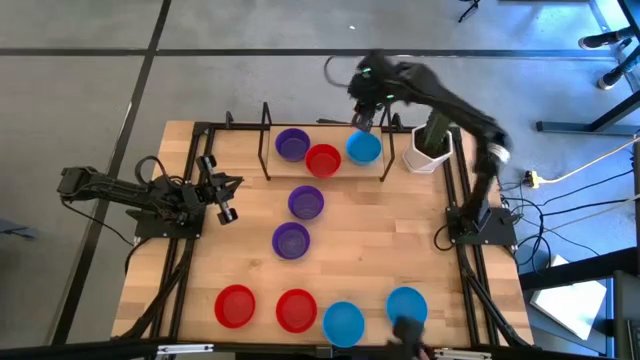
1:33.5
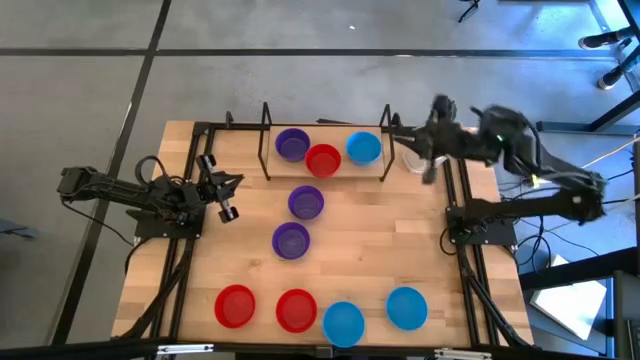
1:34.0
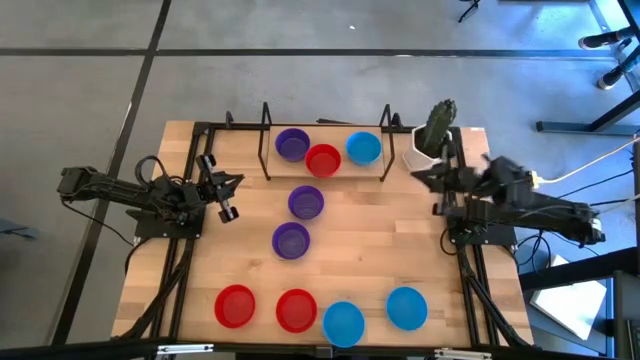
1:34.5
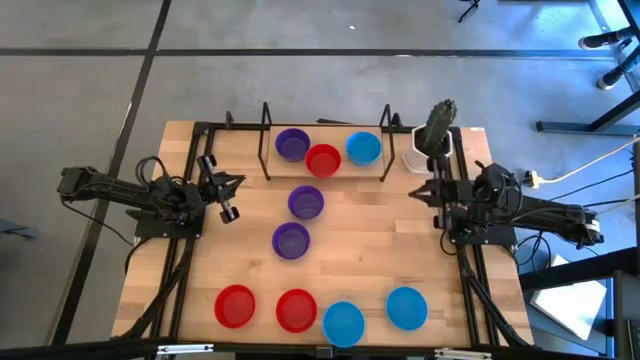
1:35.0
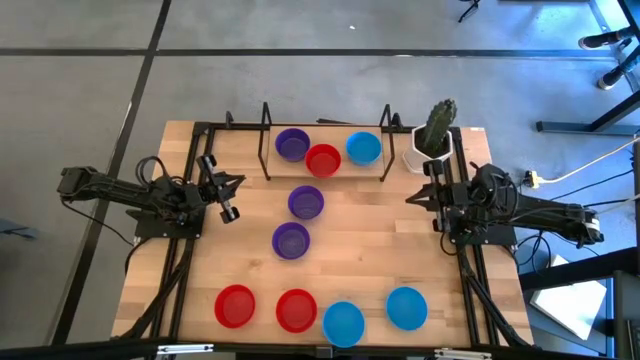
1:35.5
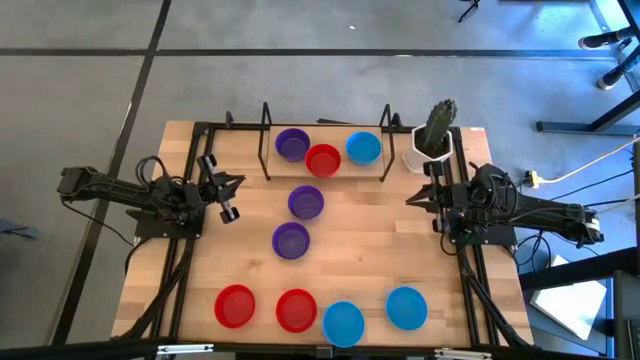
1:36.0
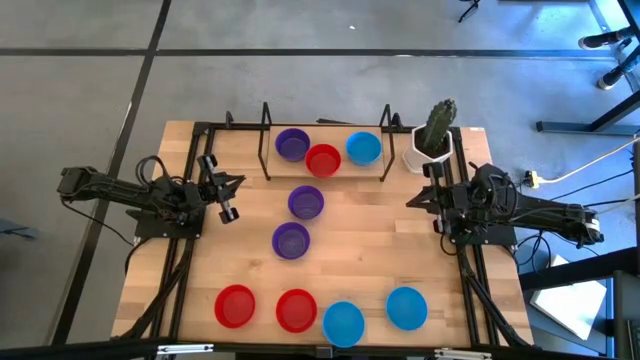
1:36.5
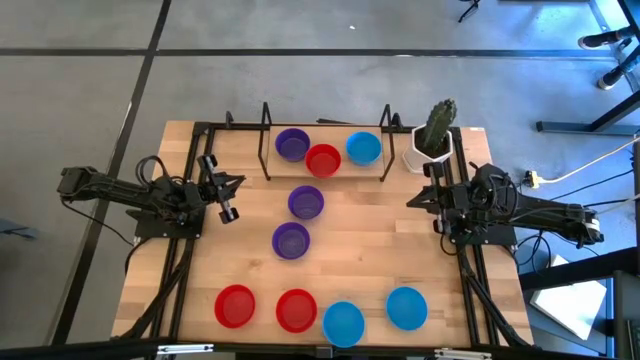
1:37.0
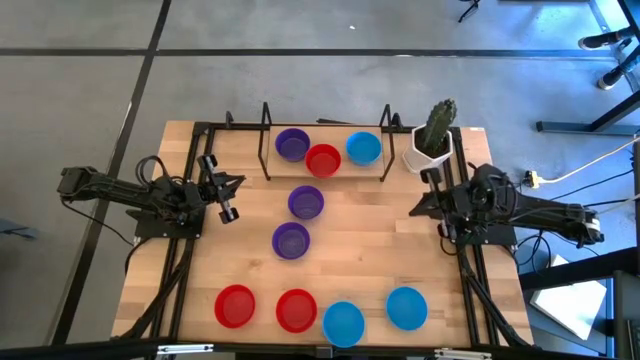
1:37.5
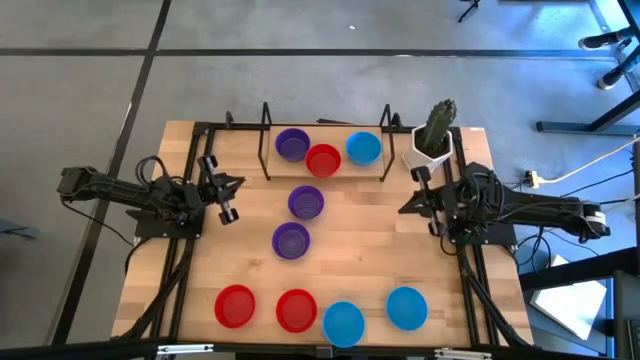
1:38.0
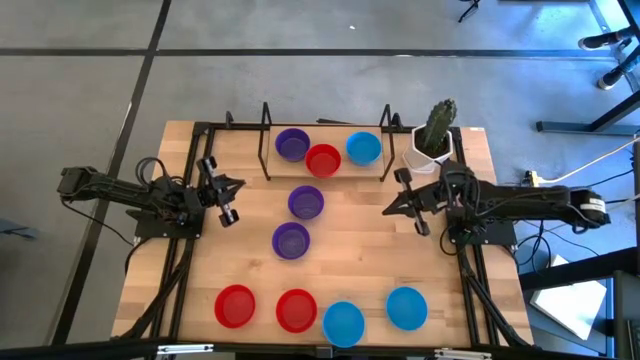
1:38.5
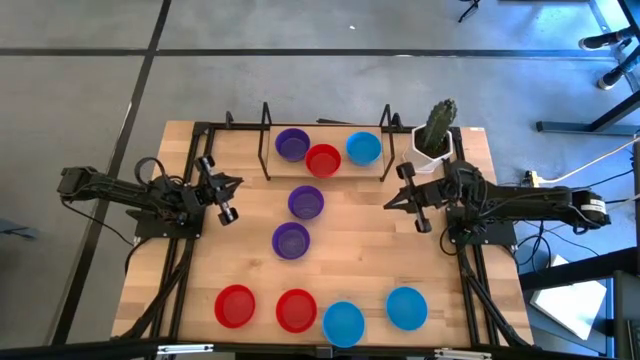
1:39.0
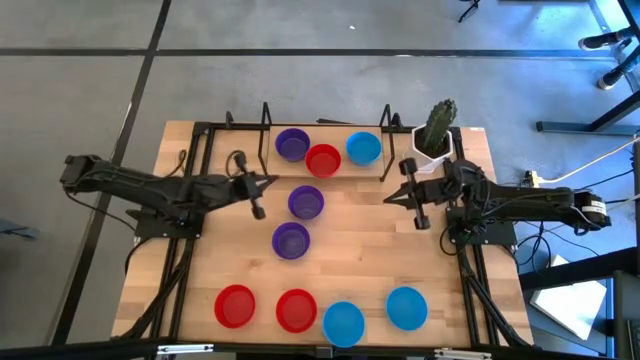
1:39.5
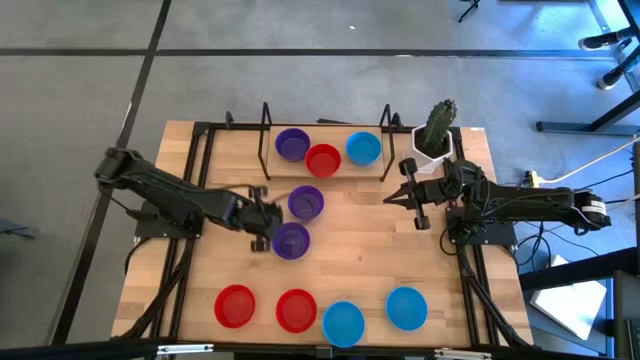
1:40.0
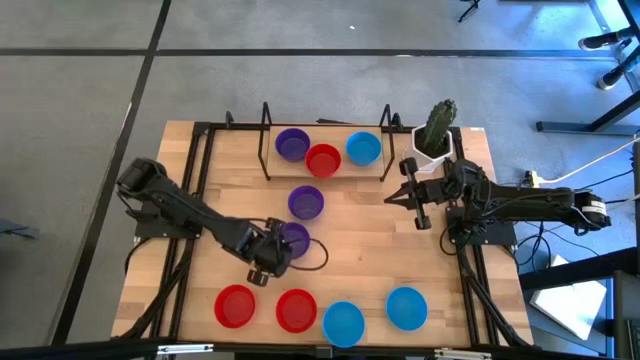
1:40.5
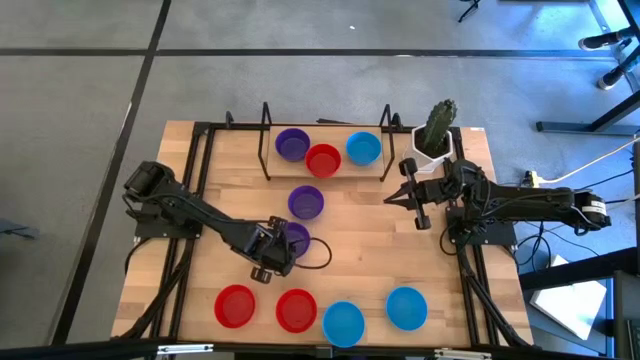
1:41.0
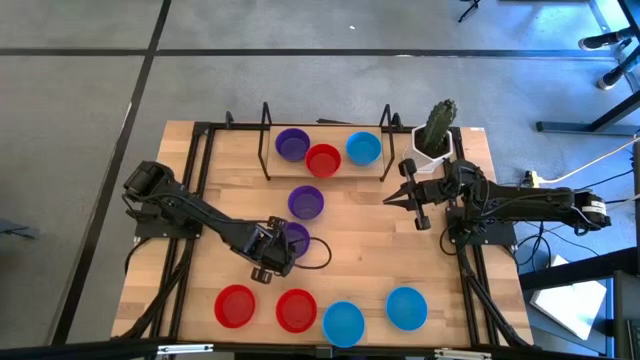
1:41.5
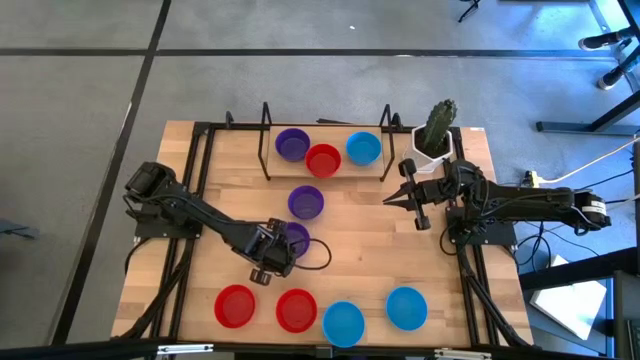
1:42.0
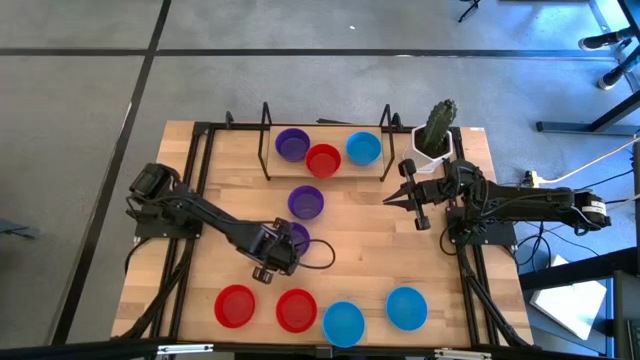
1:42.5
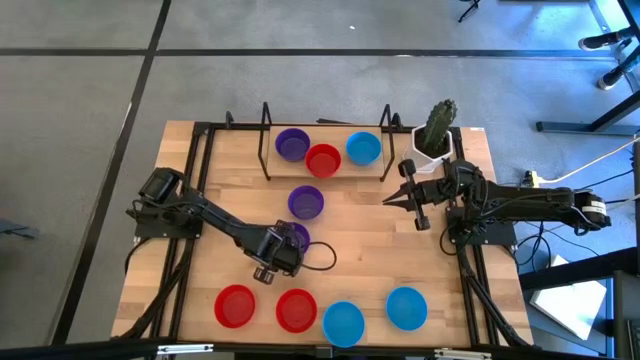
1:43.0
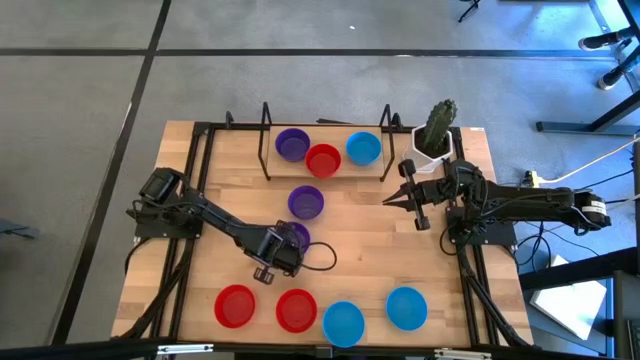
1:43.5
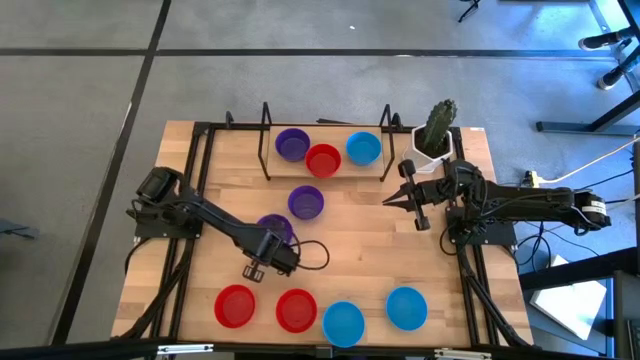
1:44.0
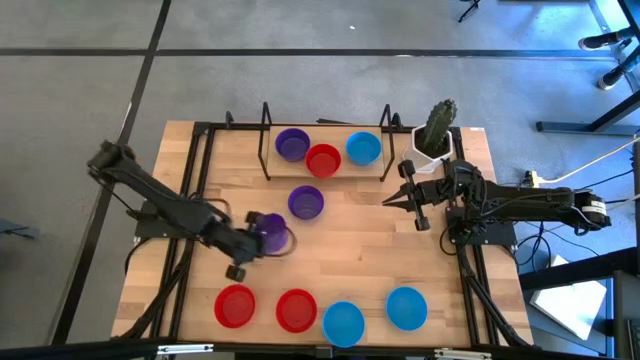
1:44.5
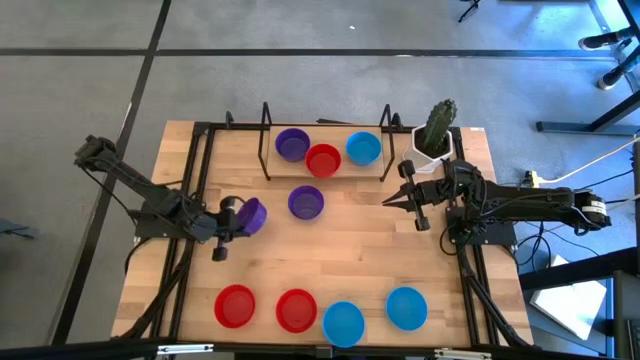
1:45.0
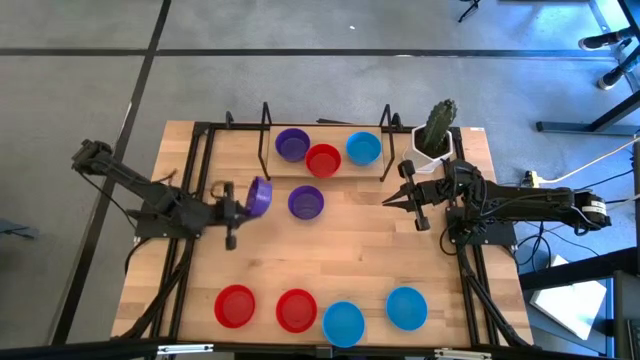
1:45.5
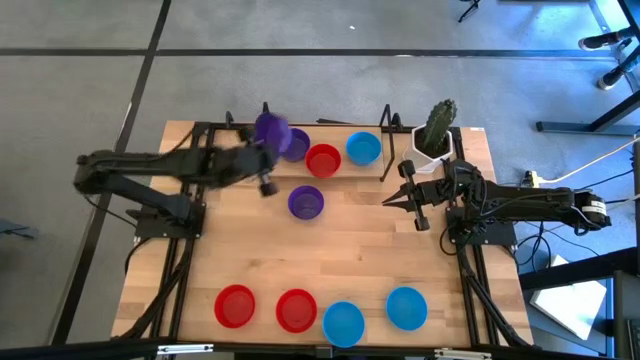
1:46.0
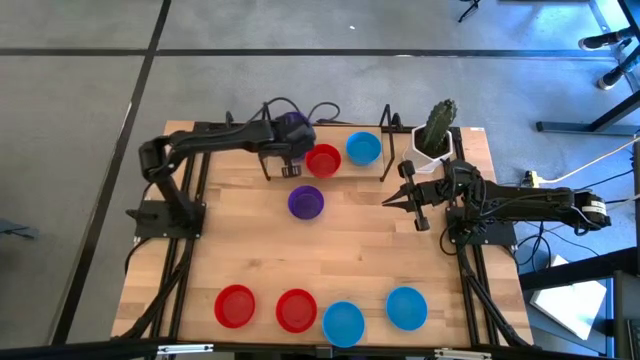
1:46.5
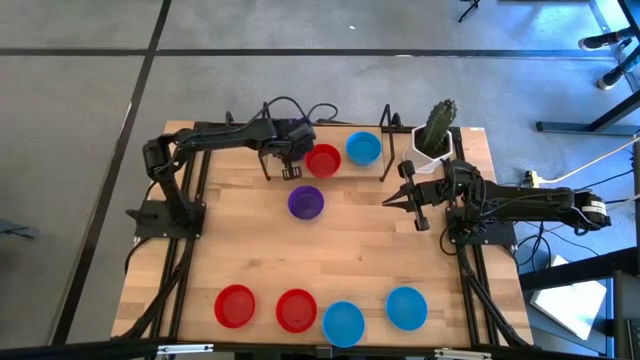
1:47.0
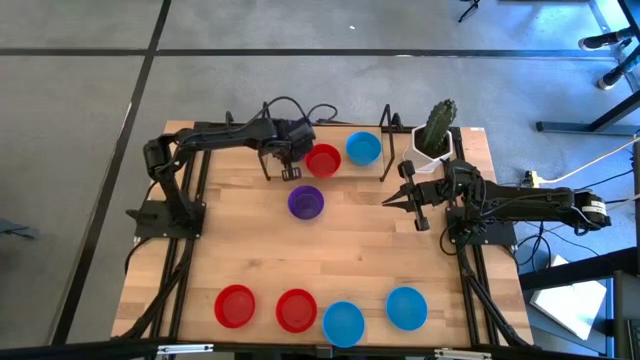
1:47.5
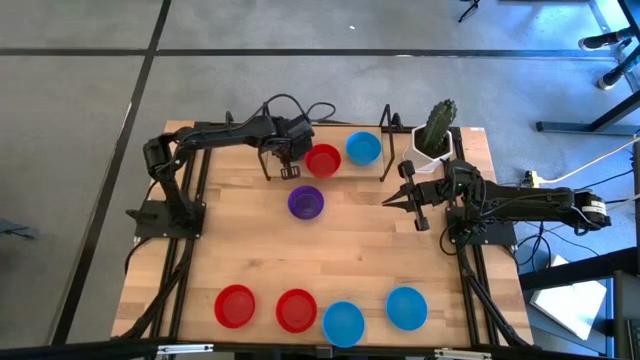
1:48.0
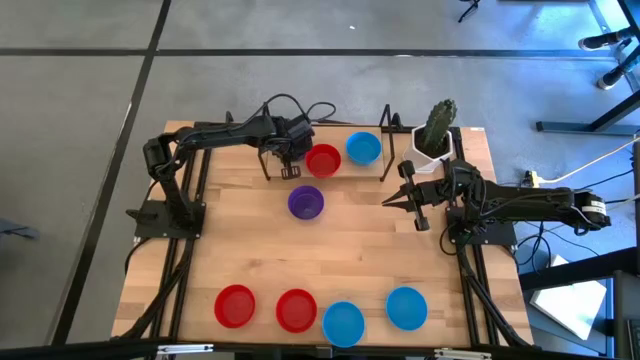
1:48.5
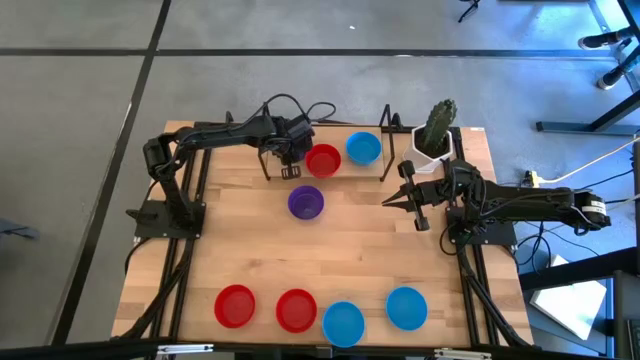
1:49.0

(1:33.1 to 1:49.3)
Task: Pick & Place Mini bowls
Stack the violet bowl on top of the violet bowl on the shelf

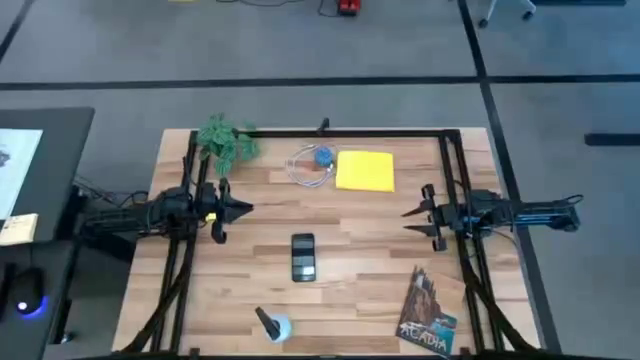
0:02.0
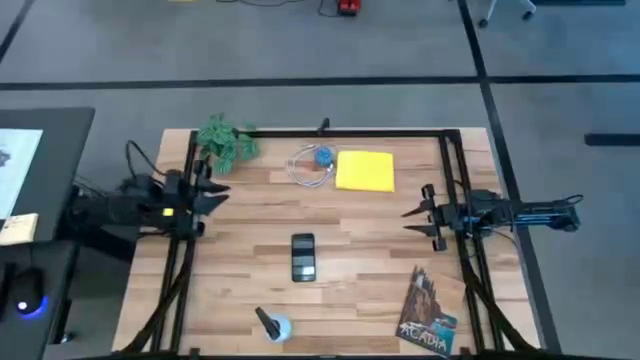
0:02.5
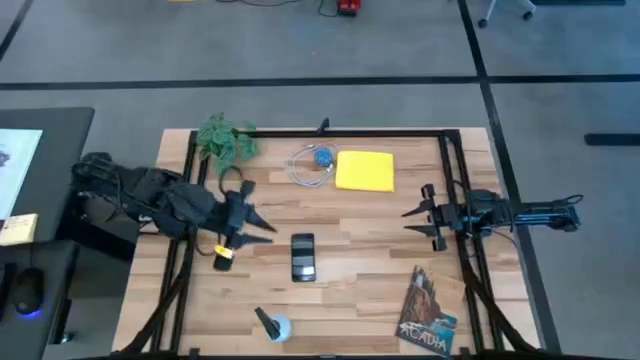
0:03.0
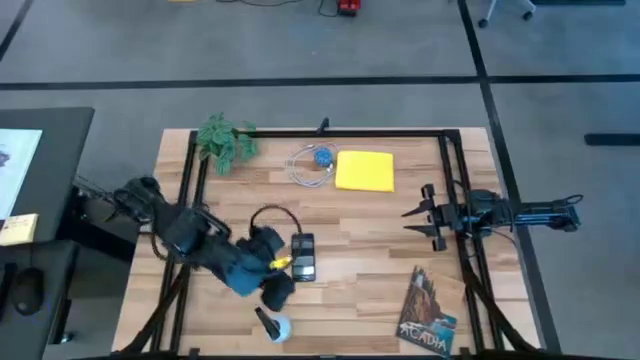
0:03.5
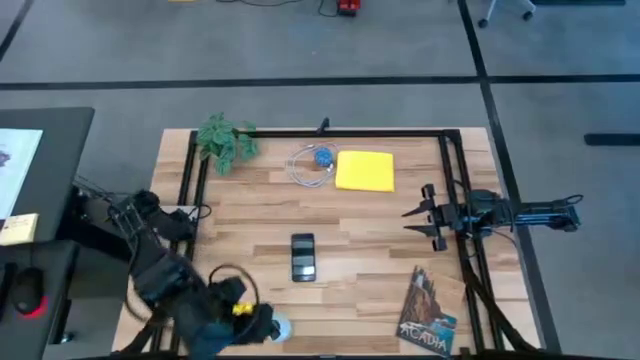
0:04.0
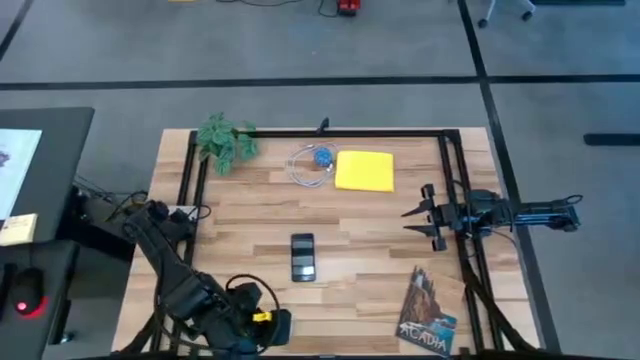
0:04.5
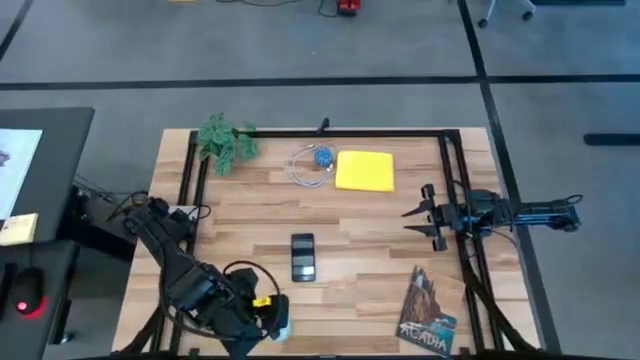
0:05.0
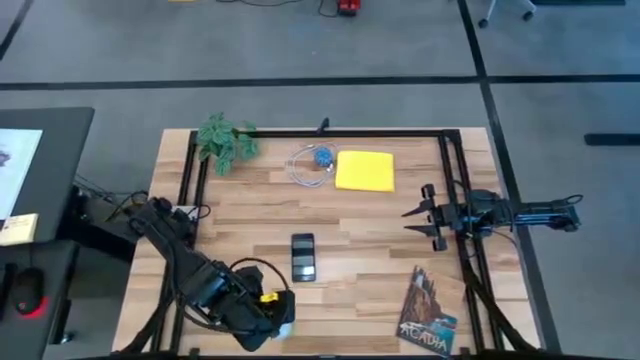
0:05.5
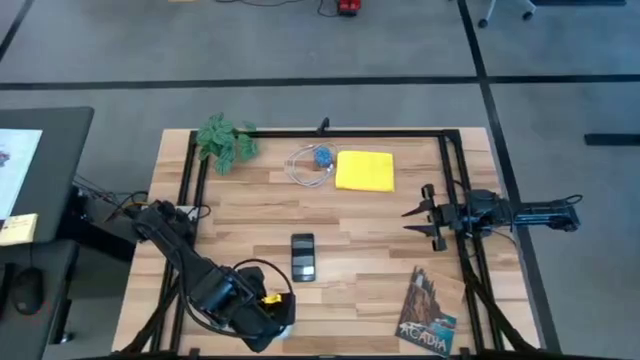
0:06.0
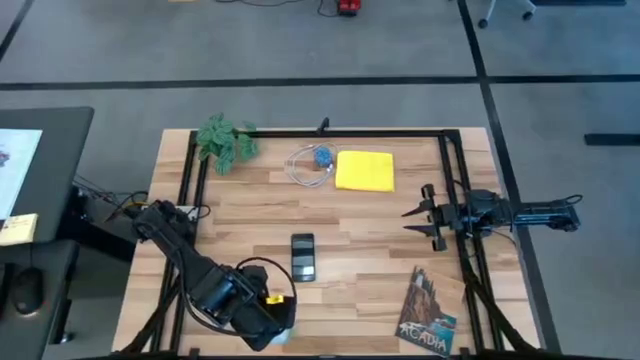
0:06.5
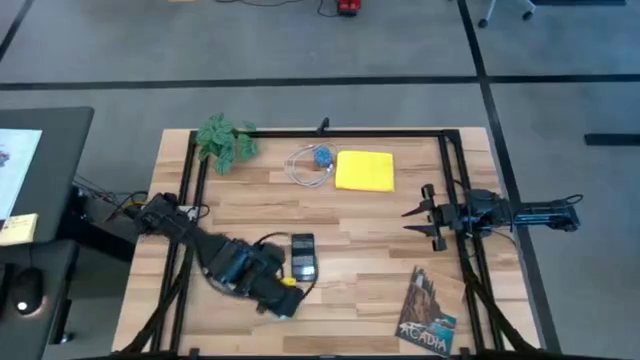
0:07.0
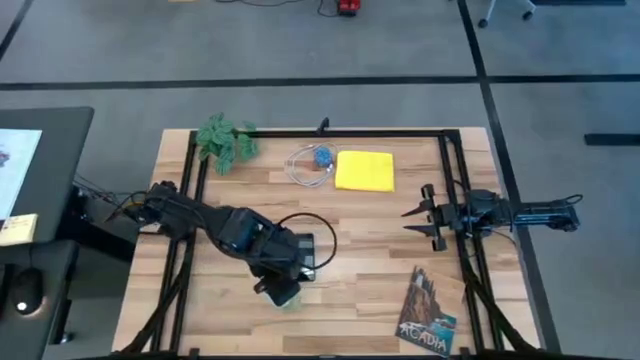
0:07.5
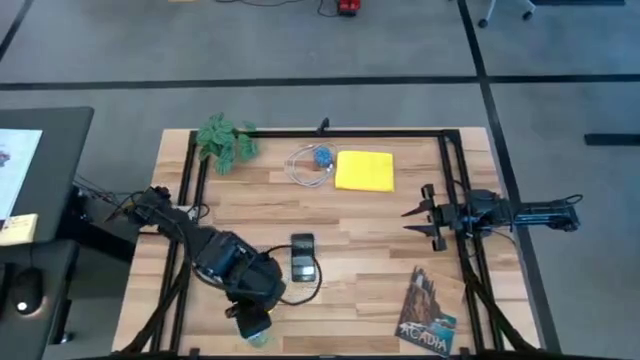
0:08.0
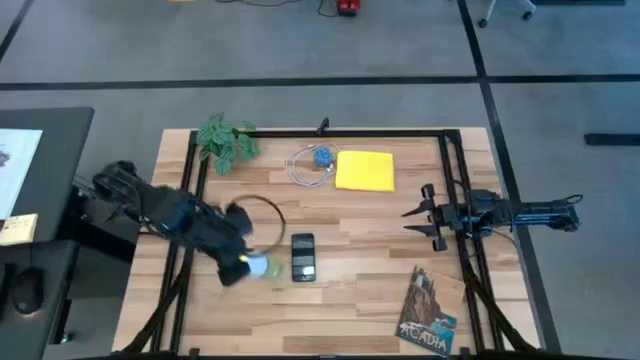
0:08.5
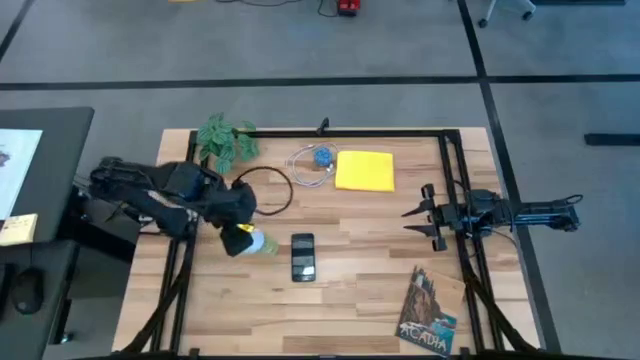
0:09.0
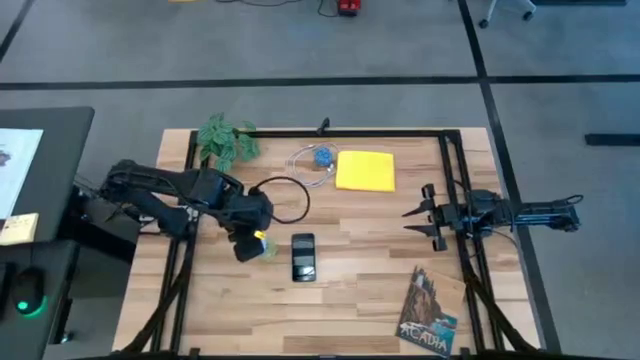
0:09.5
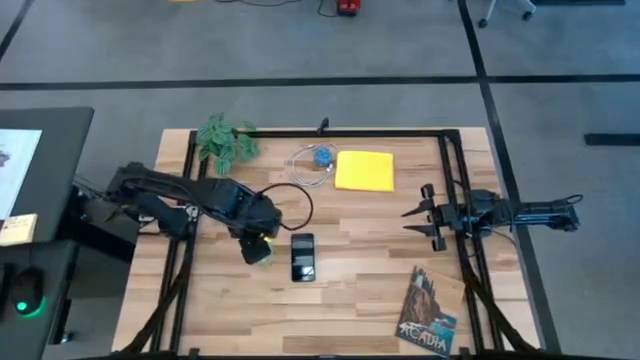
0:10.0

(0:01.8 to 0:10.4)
Task: Apply microfiber cloth
Move the cleaning bottles to the middle left of the table
